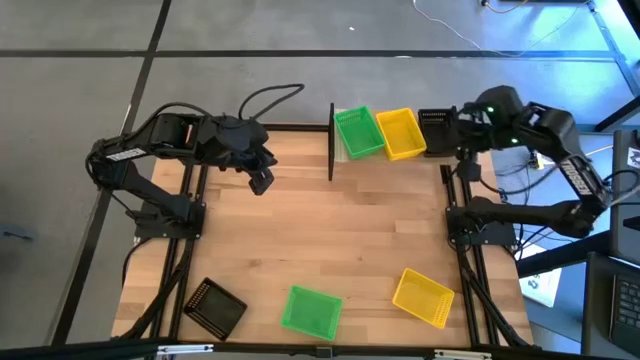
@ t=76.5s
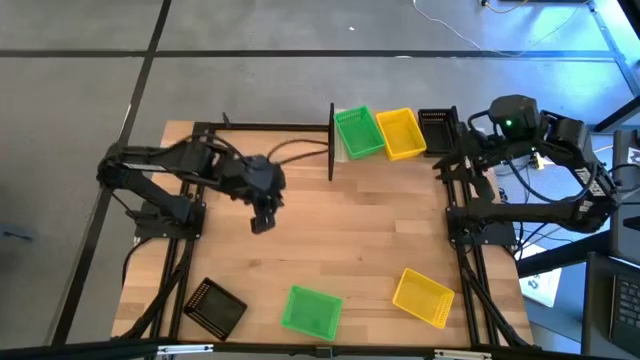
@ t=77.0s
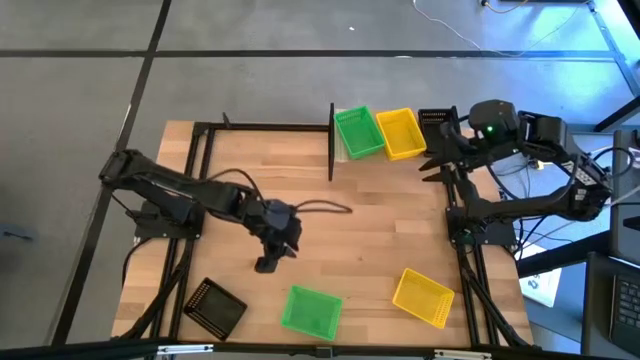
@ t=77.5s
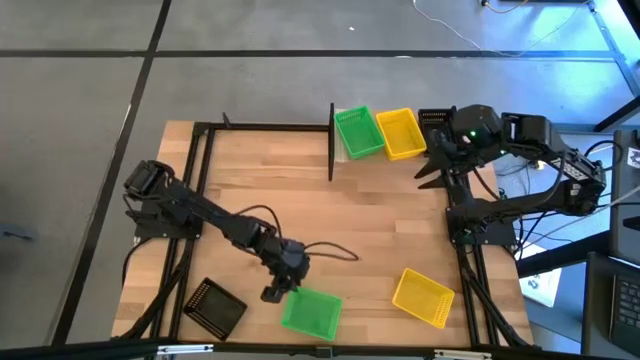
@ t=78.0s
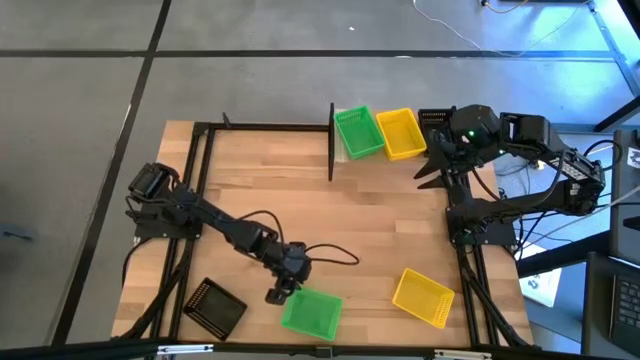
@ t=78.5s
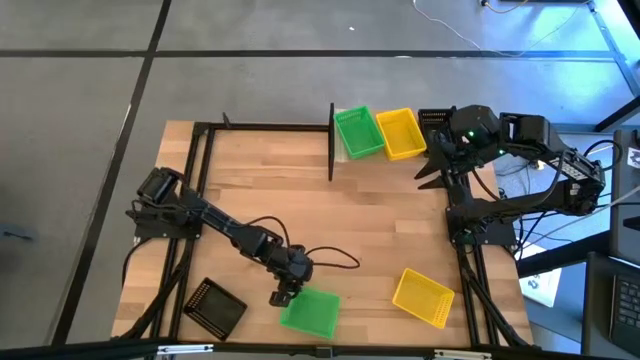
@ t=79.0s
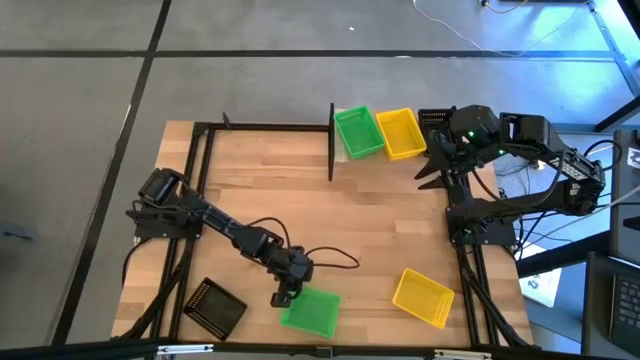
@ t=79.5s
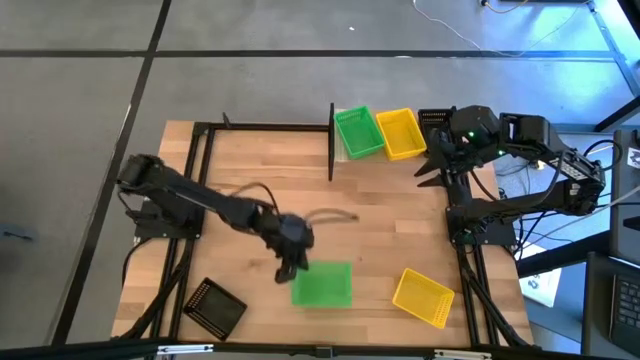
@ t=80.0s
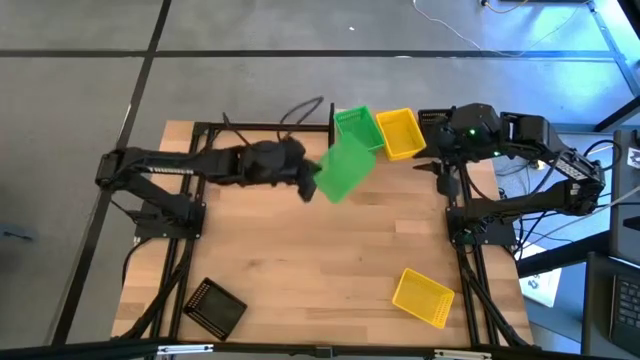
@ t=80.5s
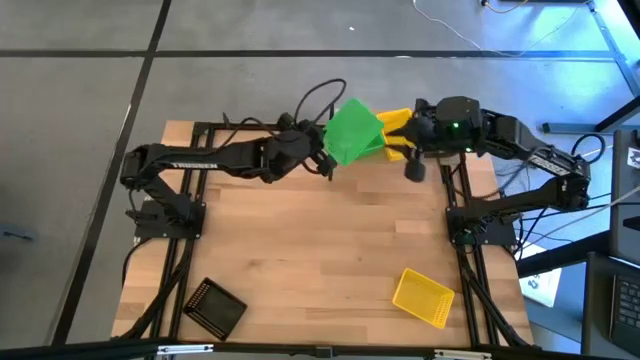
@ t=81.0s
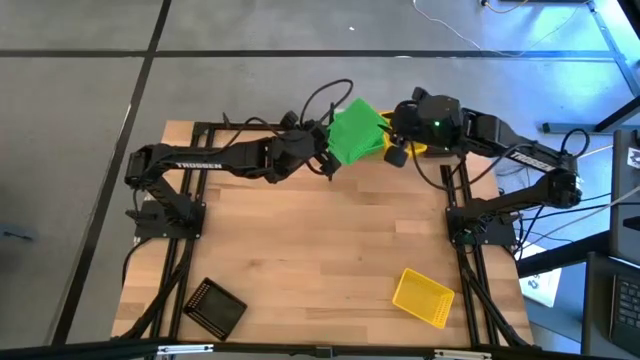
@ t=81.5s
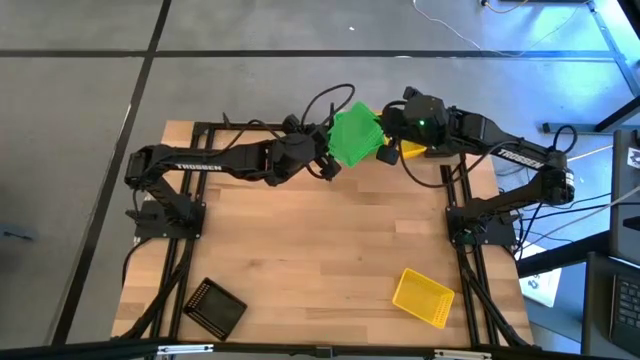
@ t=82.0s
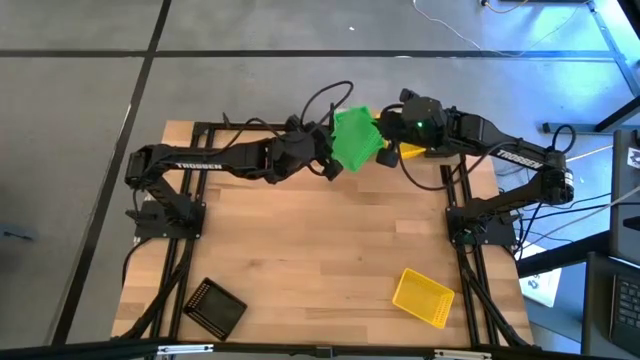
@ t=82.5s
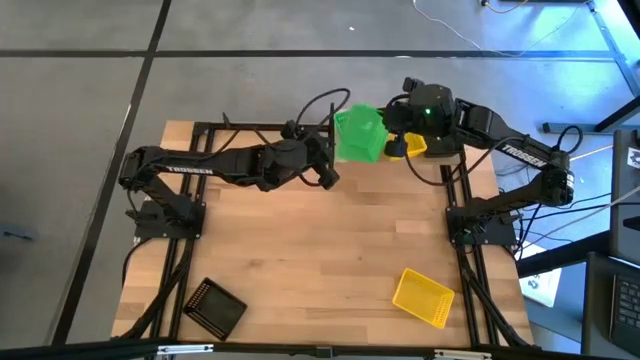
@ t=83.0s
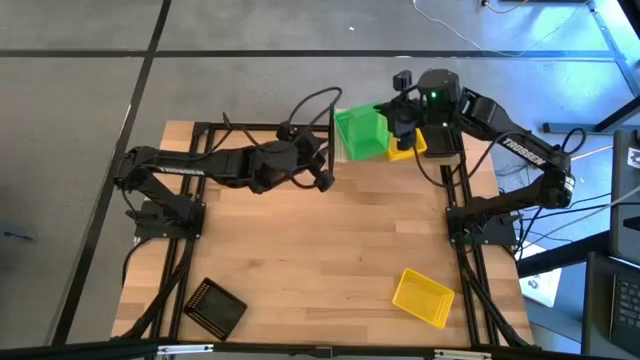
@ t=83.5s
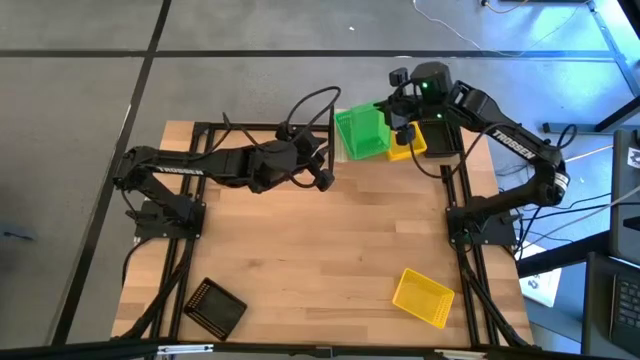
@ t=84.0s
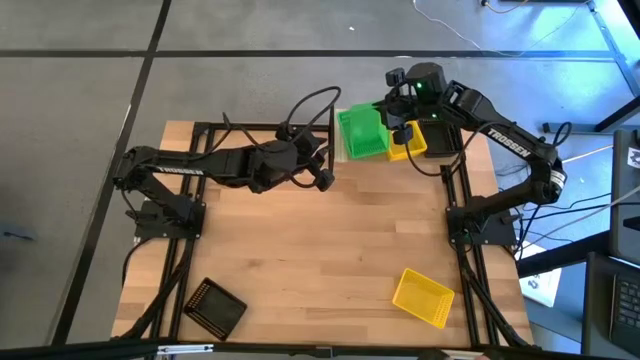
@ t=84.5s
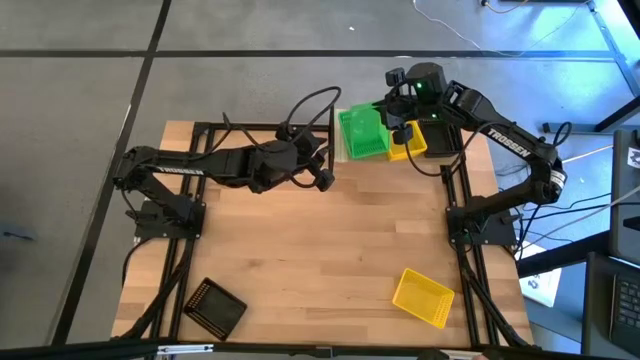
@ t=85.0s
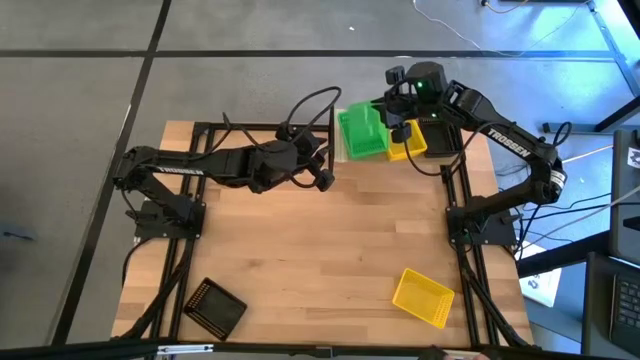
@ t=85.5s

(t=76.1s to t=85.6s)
Task: Stack baskets on shelf by color
Stack the green bin on the green bins on the shelf

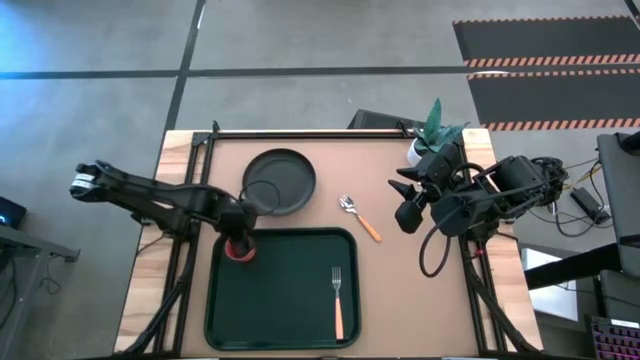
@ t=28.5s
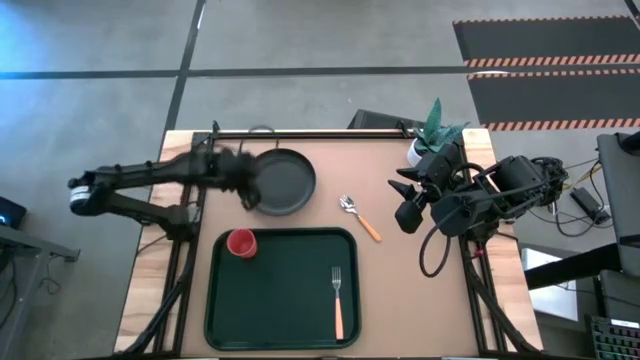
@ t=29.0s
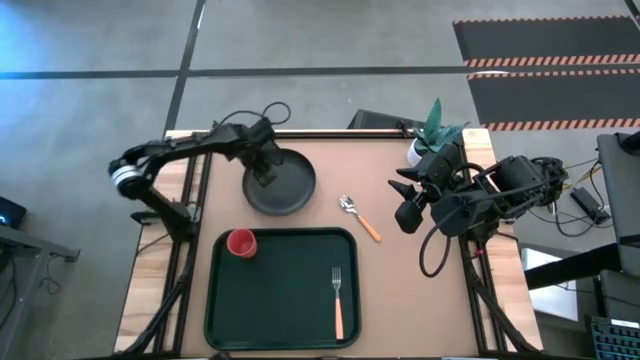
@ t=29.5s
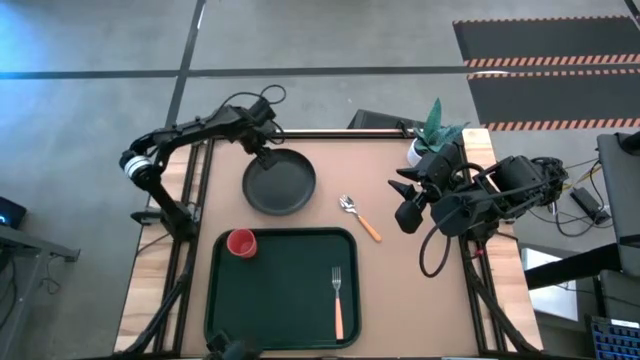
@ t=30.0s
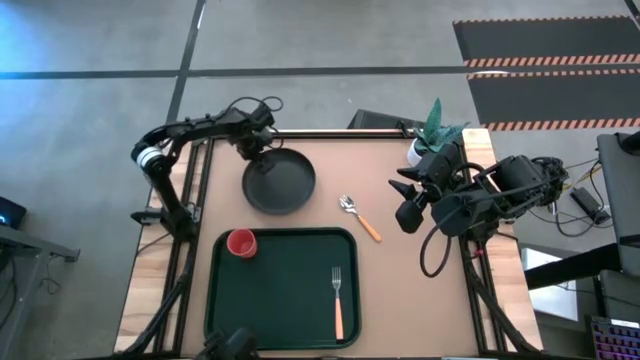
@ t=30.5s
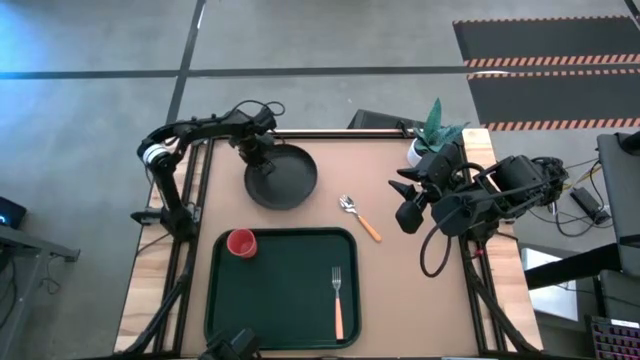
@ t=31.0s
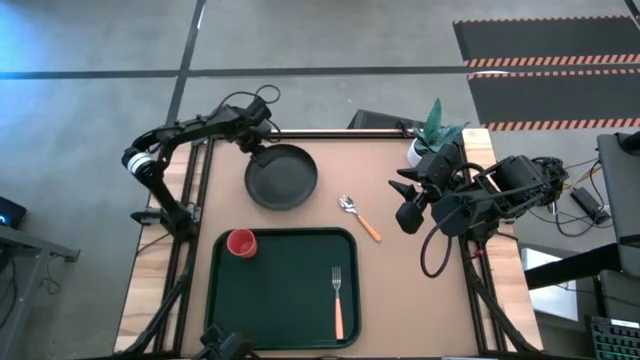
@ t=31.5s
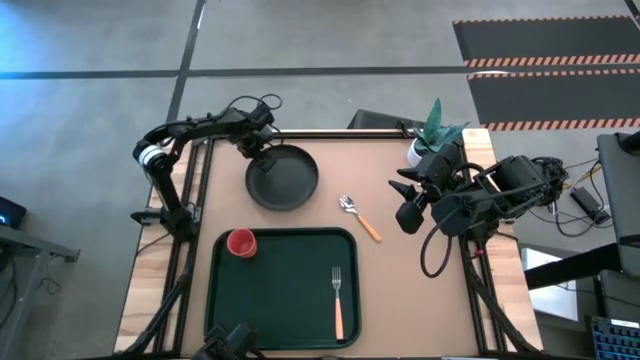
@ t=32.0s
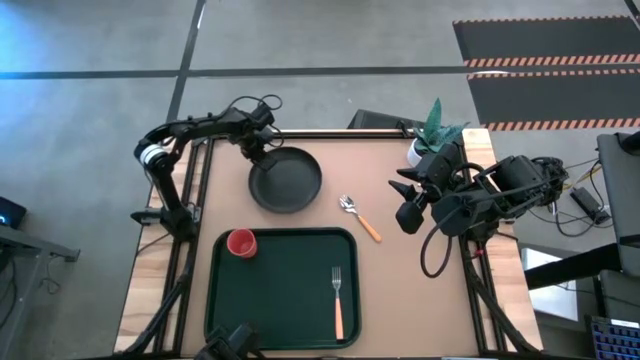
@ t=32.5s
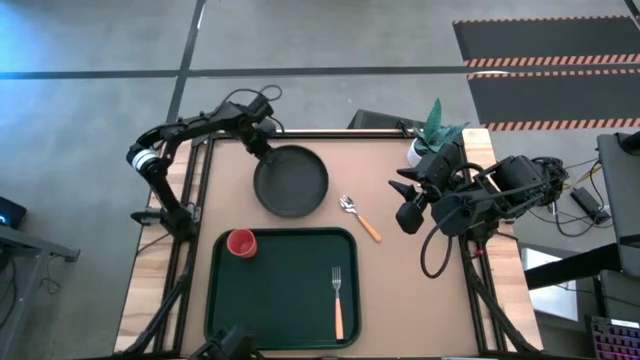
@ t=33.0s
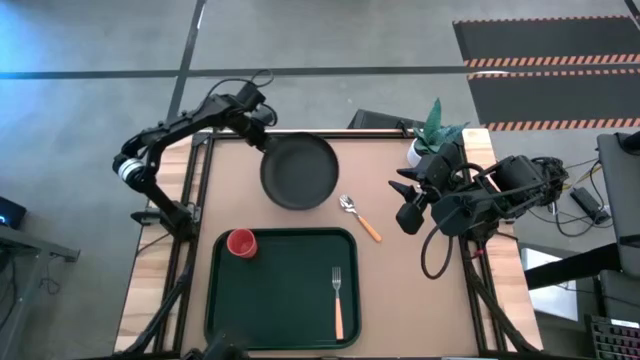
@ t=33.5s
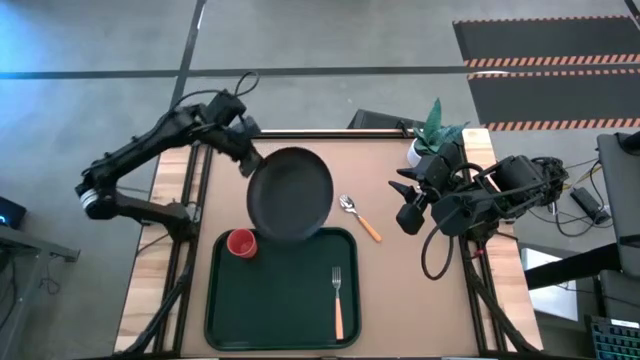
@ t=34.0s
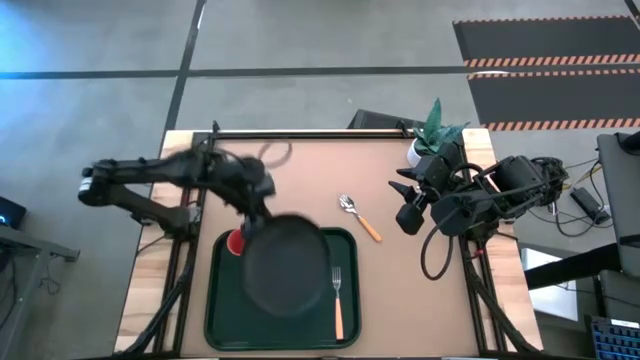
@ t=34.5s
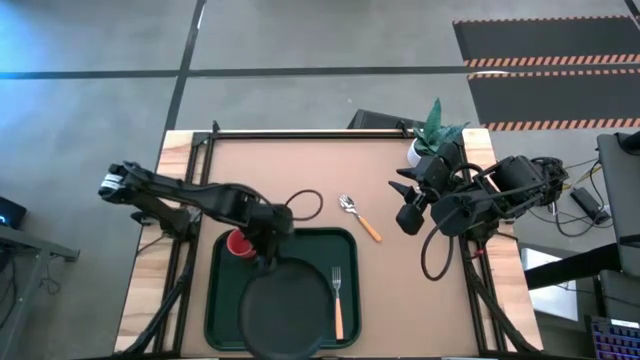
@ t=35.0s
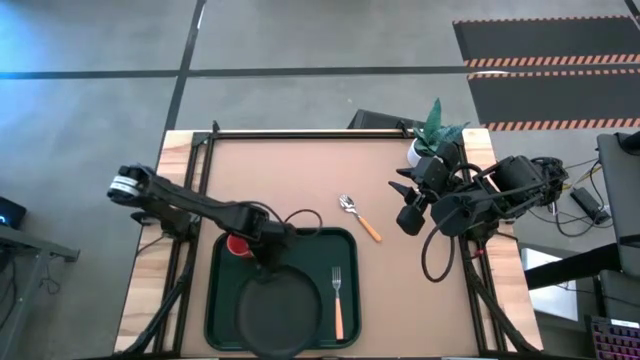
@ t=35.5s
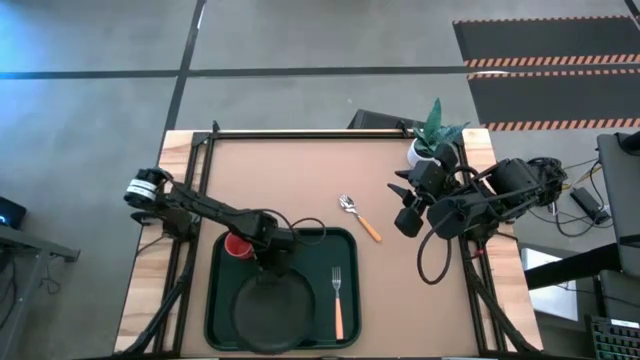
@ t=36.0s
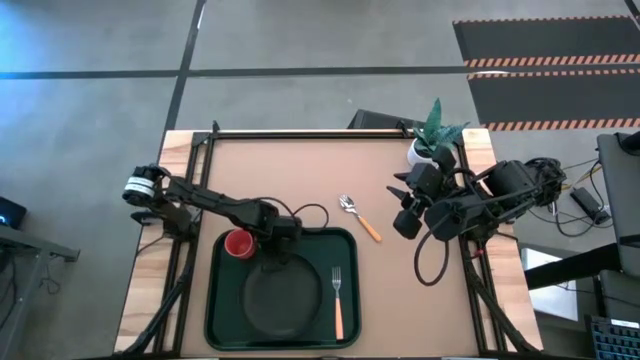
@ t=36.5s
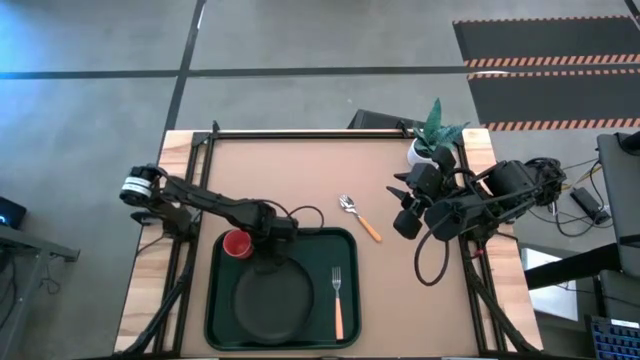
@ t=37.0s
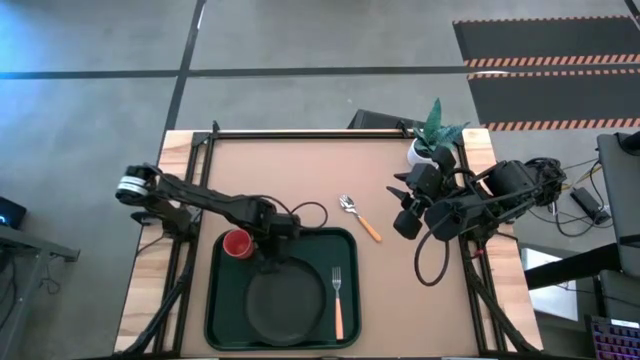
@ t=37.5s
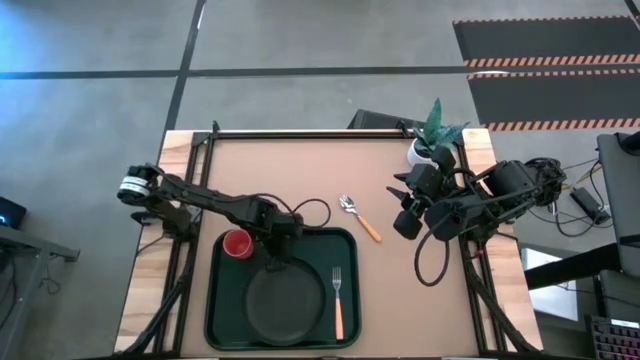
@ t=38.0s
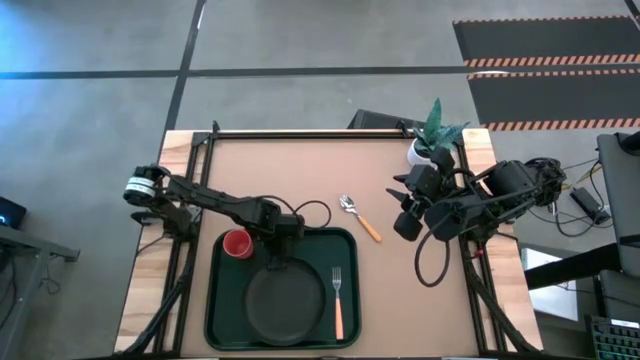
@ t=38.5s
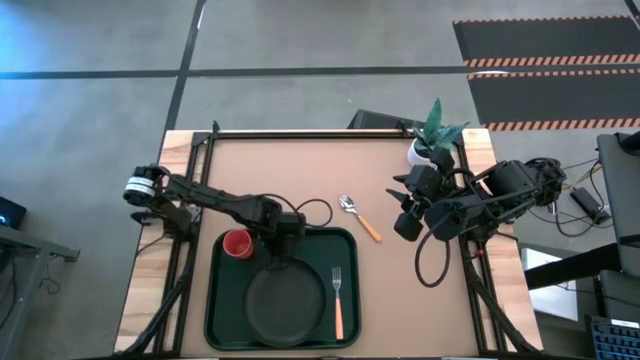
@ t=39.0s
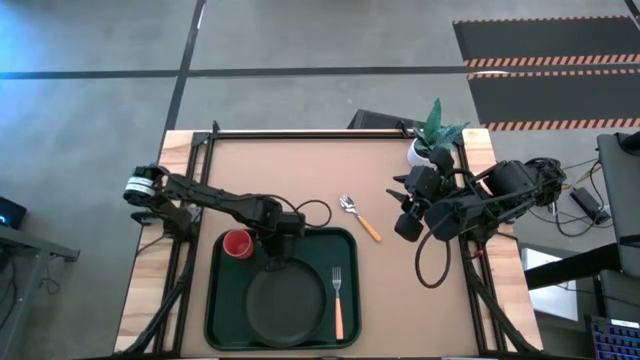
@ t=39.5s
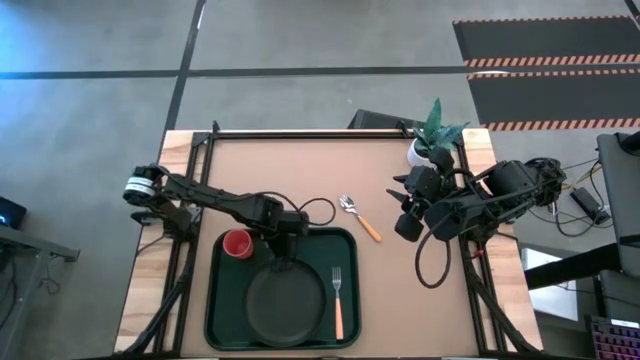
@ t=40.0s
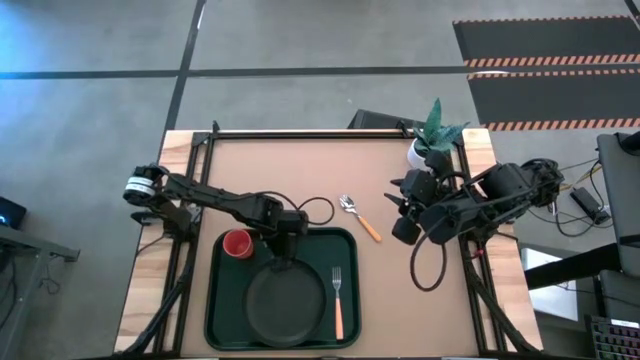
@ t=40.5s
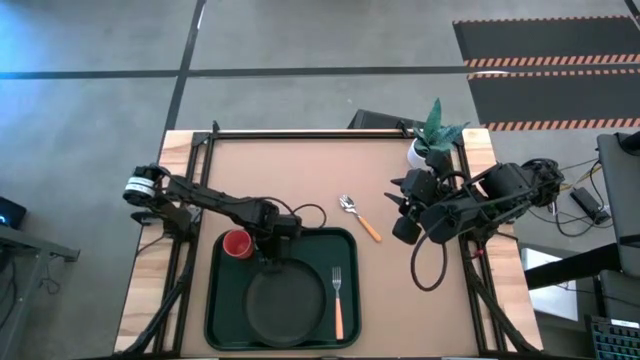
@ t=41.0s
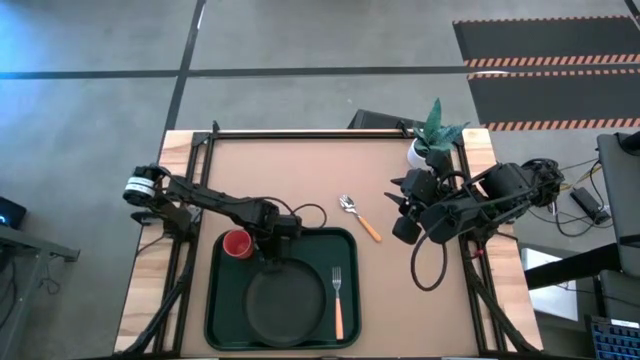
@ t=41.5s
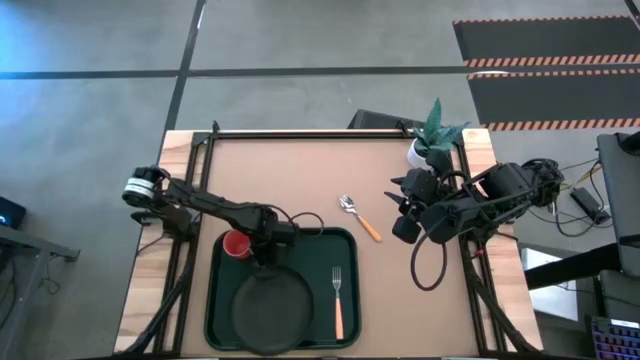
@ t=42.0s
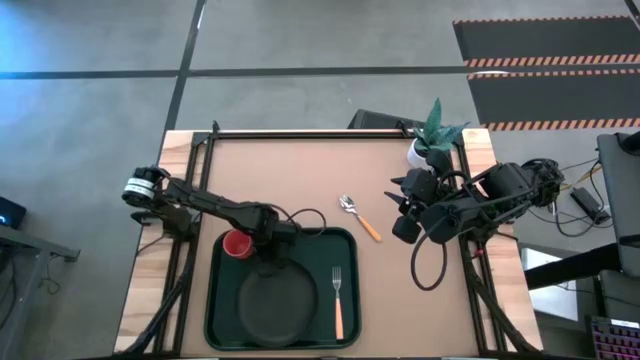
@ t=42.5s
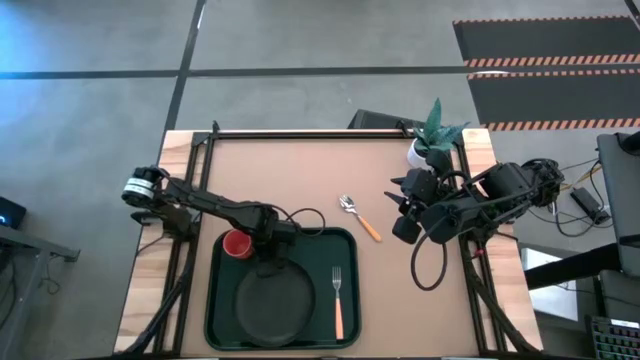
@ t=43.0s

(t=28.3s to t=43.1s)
Task: Pick and place plate/cup/fork/spoon on tray
Put the black plate on the center of the black tray
